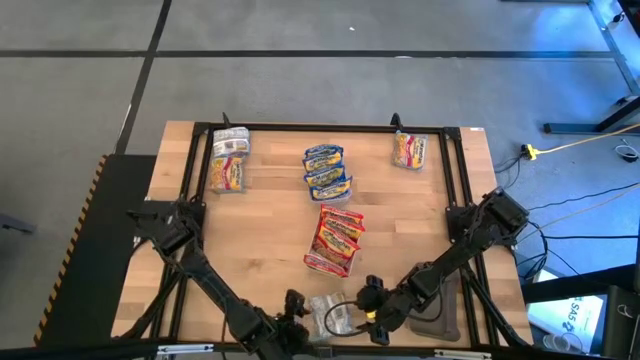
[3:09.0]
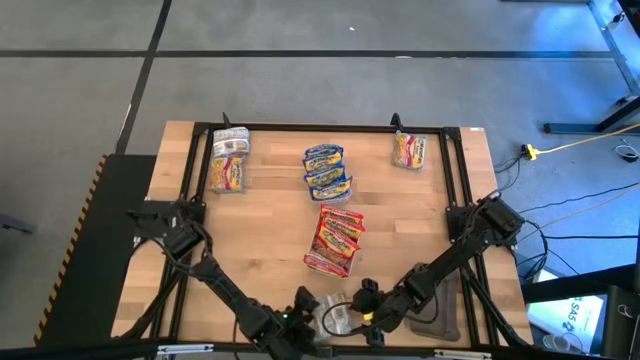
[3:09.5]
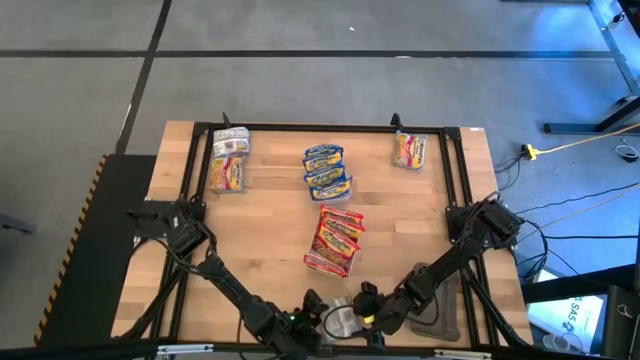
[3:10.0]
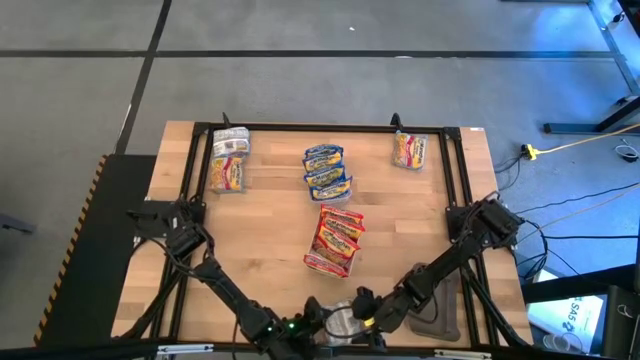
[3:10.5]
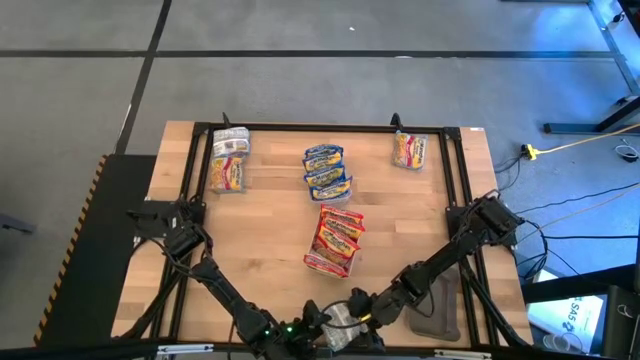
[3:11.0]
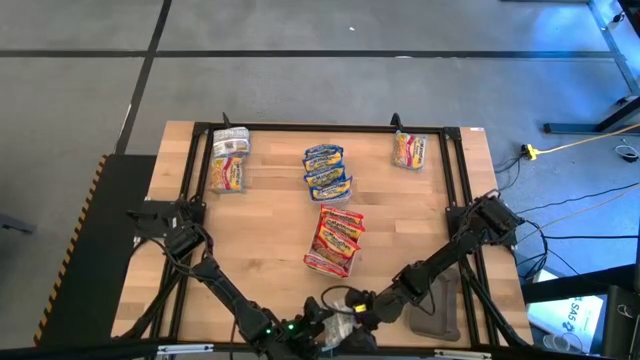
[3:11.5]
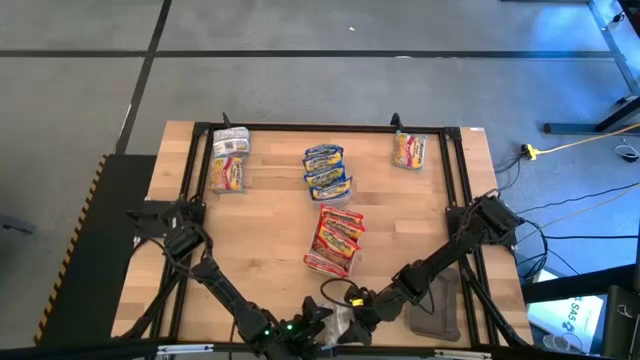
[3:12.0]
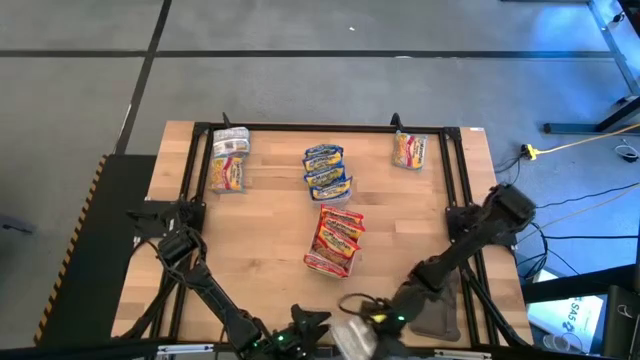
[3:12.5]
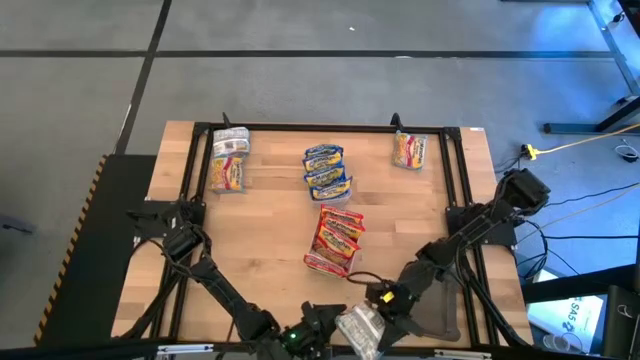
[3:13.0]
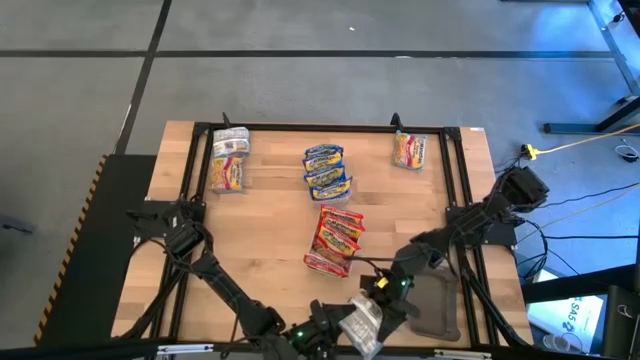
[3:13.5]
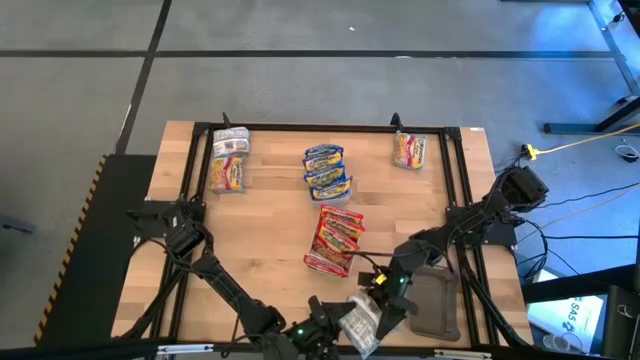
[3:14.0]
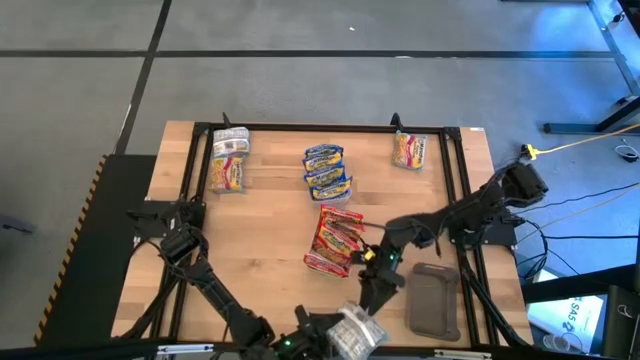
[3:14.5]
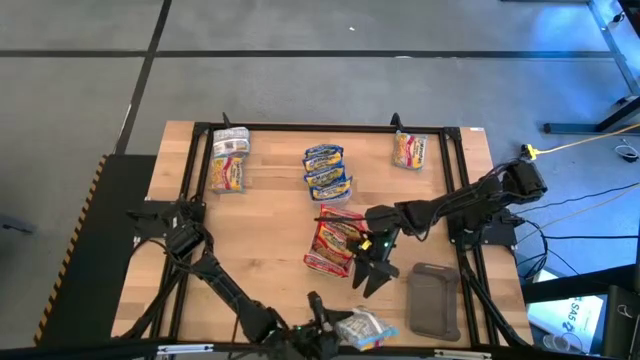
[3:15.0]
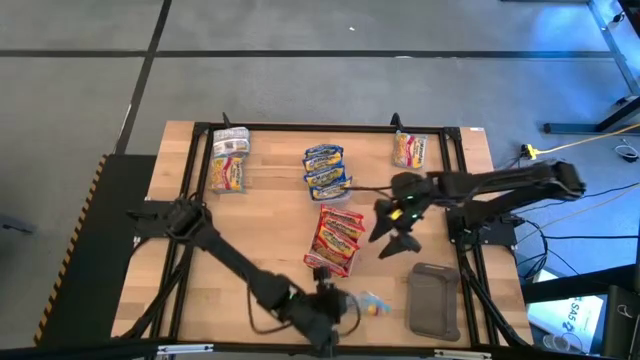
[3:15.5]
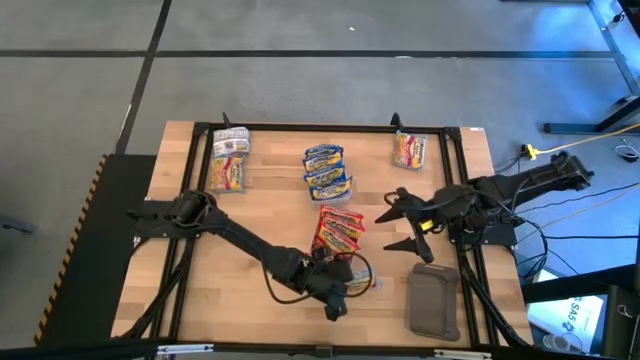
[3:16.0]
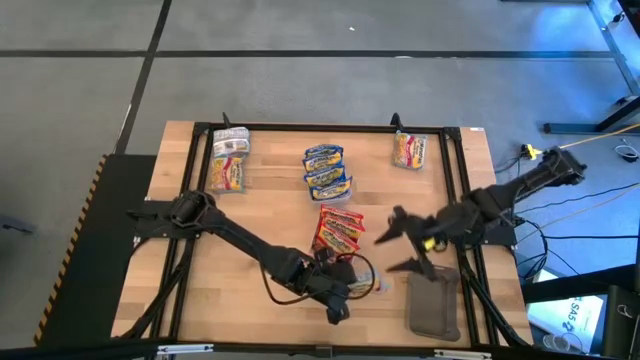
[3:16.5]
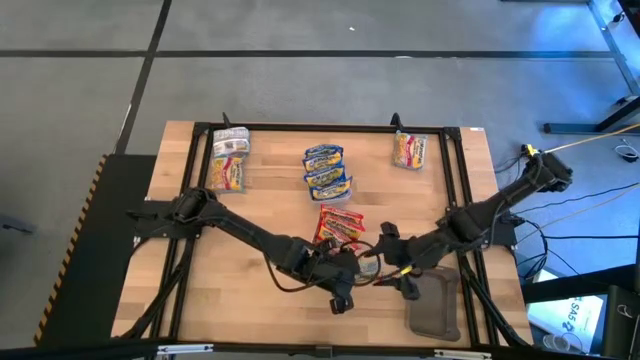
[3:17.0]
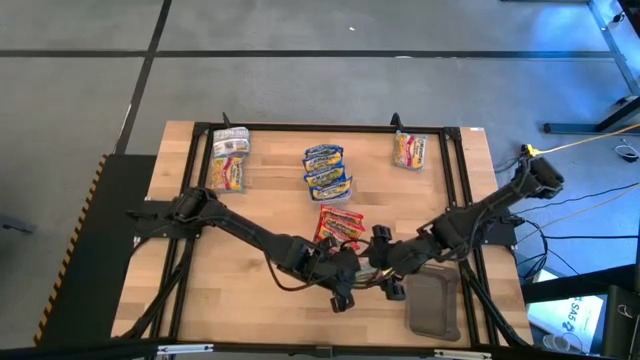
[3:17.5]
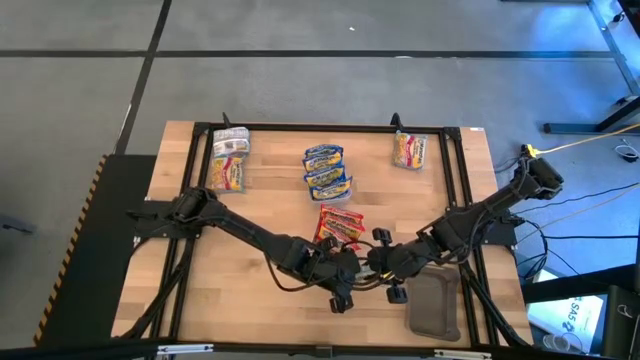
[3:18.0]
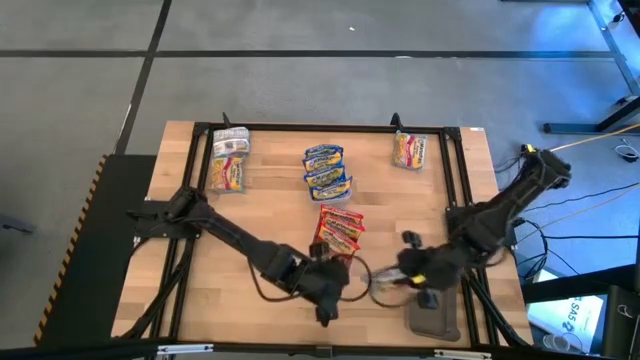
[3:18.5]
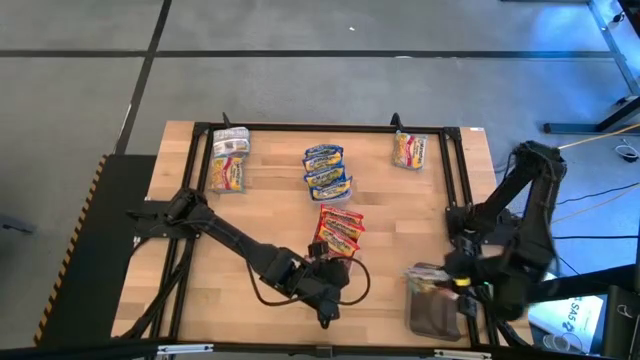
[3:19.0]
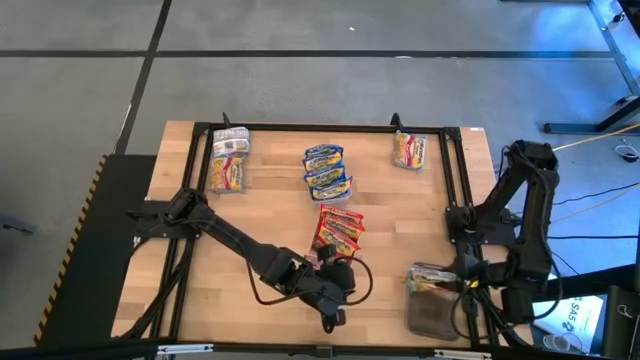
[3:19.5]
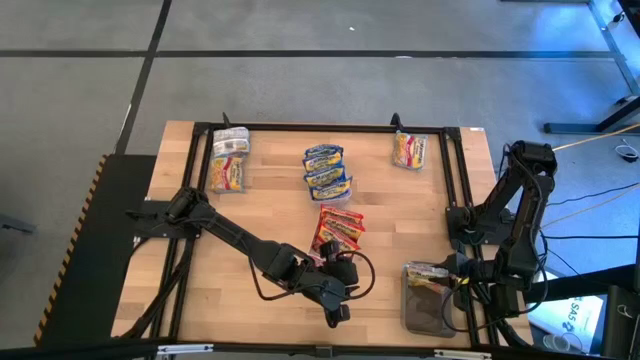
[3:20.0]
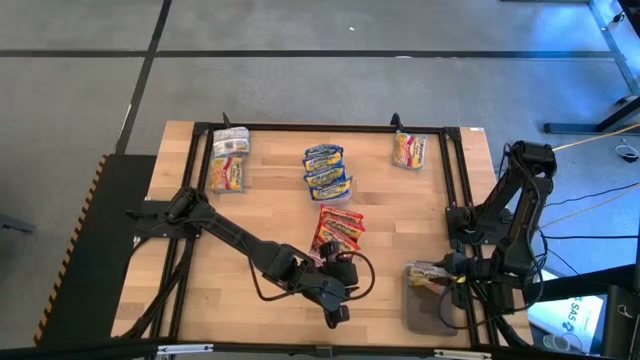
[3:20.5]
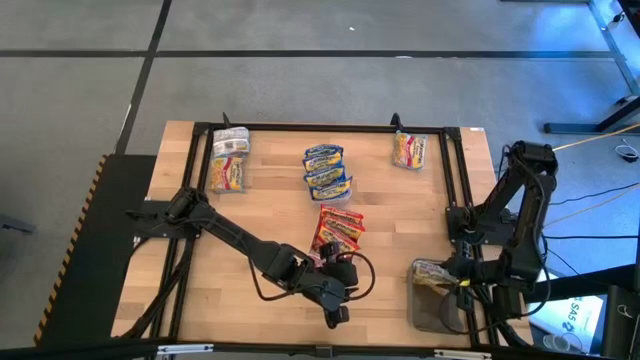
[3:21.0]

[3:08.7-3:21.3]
Task: Sort Maruchan noodles
Put the light blue noodle pack into the black bin

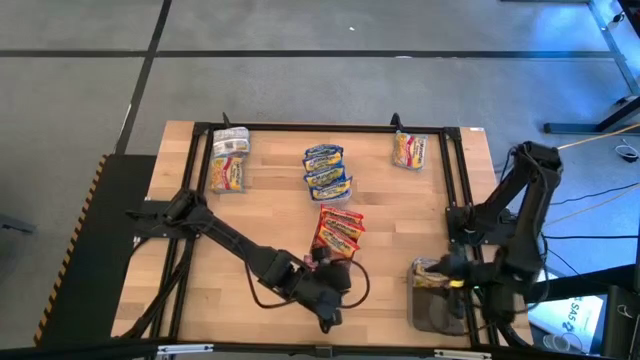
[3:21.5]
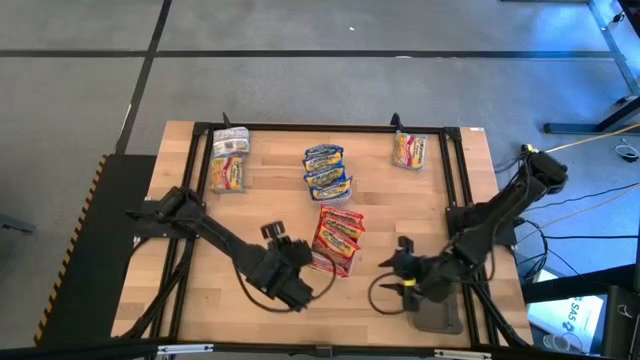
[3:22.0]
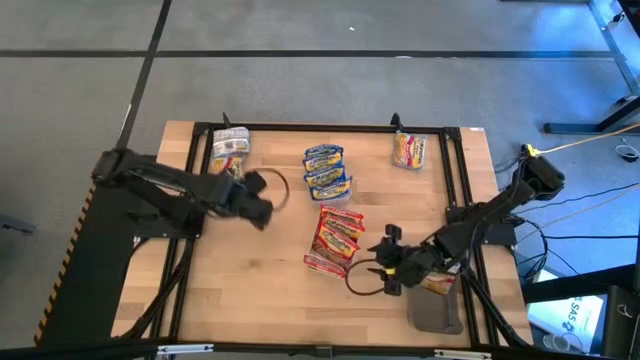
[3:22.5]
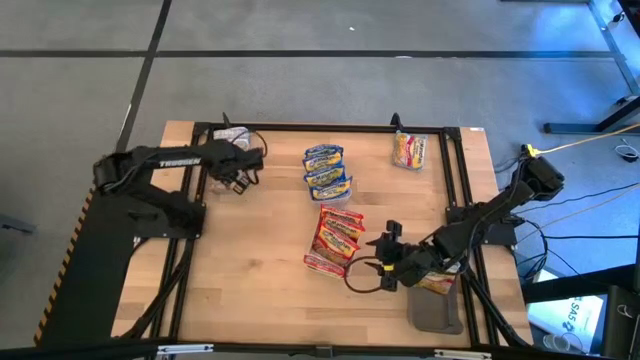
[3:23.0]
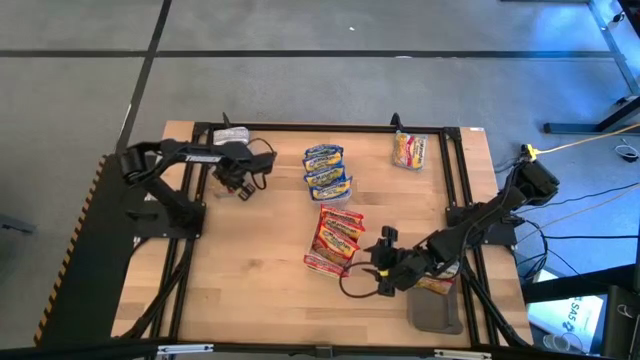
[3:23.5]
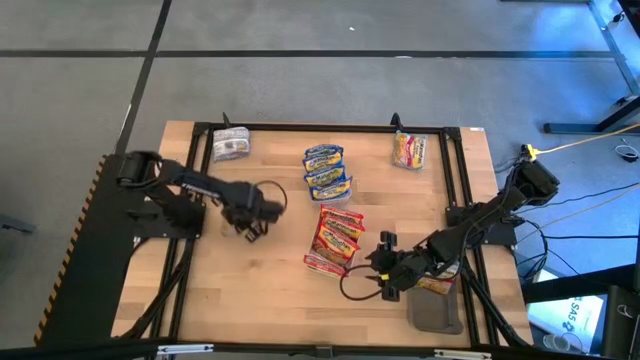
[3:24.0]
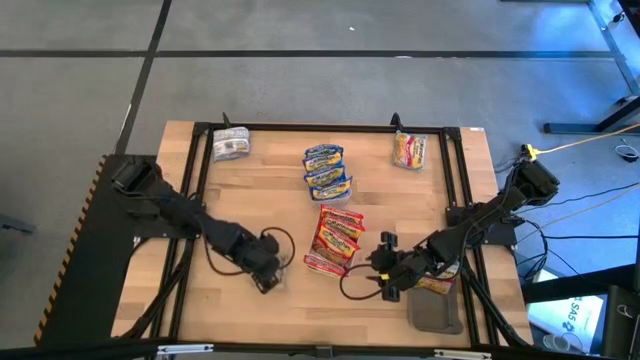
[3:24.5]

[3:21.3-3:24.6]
Move the light blue noodle pack to the bottom of the table

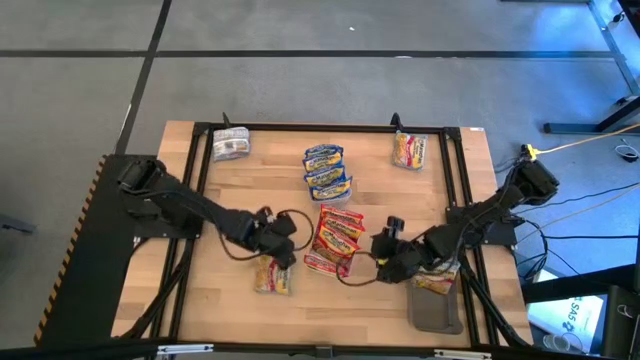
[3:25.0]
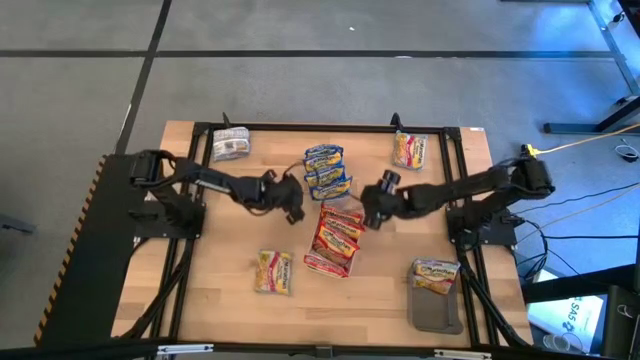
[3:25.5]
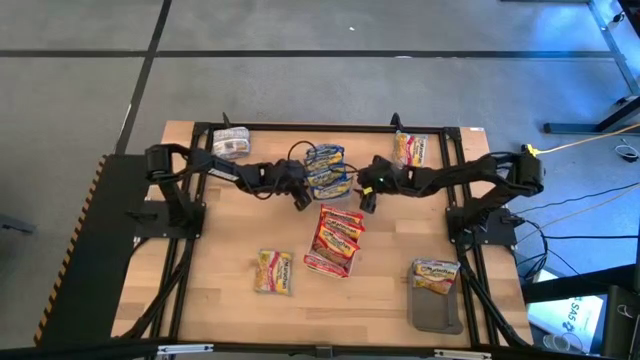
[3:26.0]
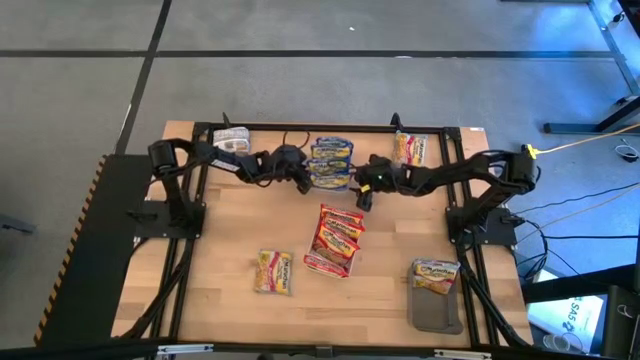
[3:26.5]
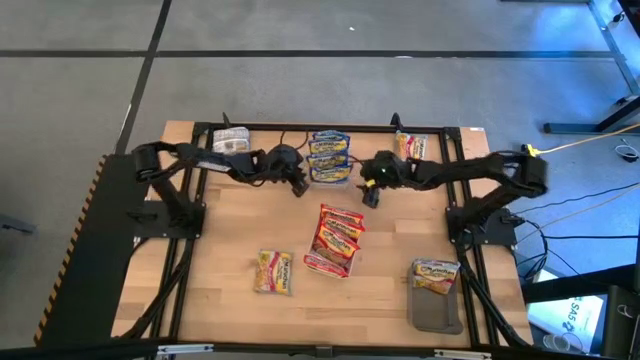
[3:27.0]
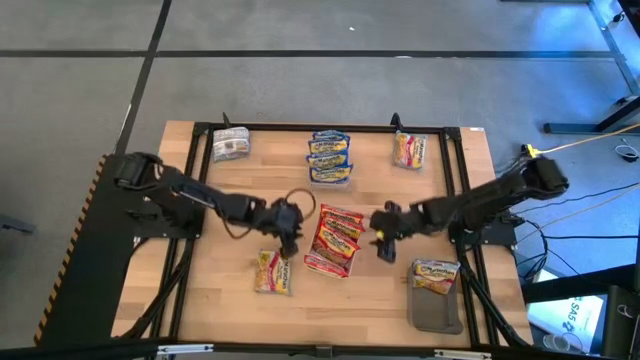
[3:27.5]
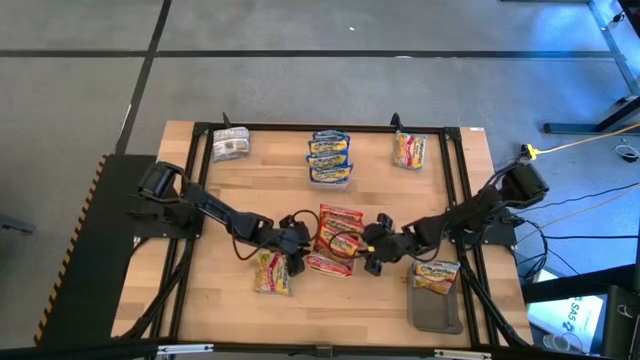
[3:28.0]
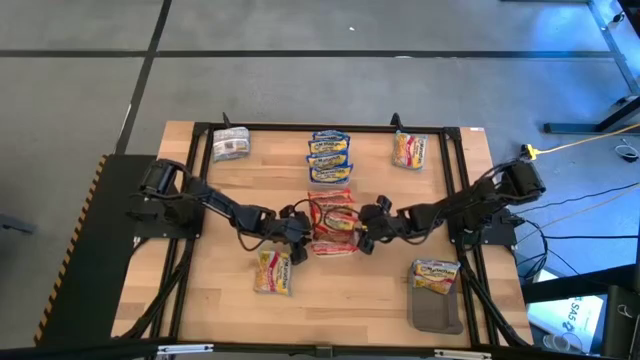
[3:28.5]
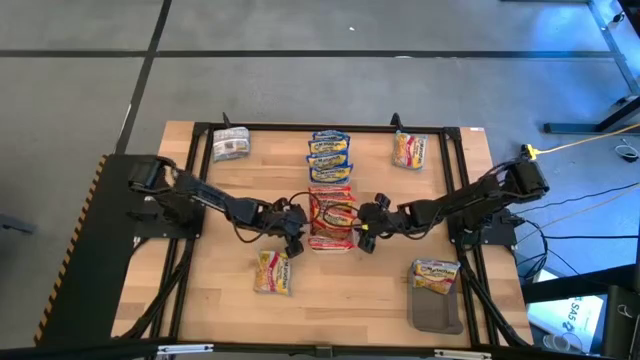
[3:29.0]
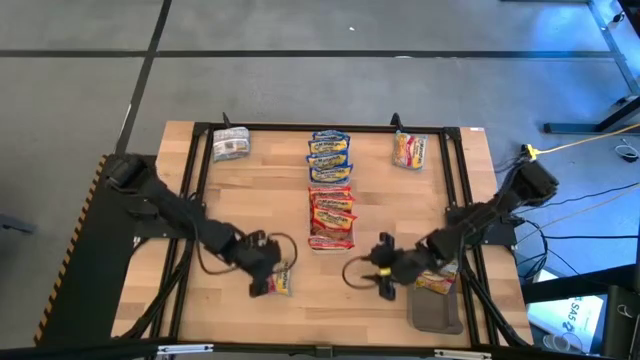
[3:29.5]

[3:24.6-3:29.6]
Adjust the bins
